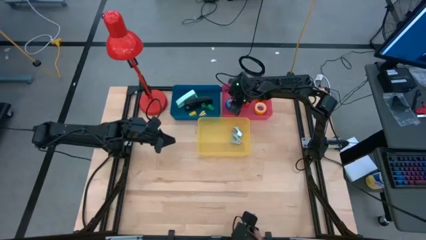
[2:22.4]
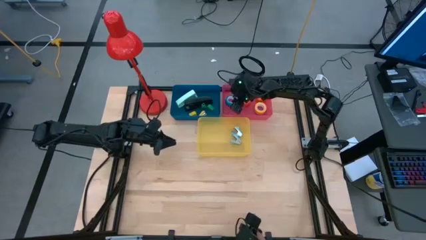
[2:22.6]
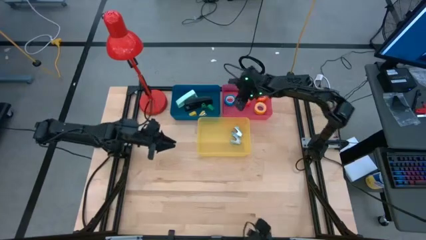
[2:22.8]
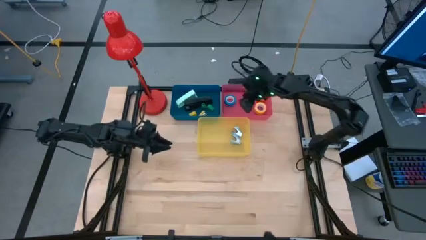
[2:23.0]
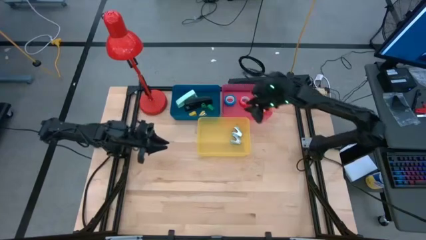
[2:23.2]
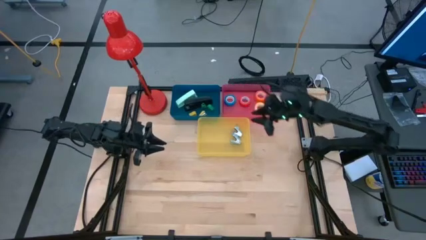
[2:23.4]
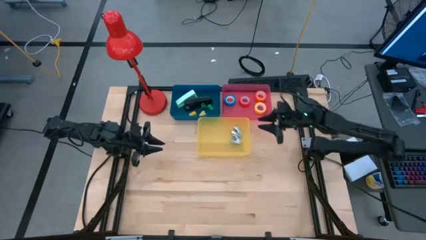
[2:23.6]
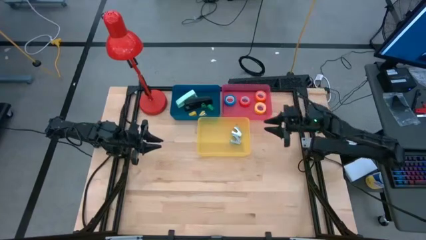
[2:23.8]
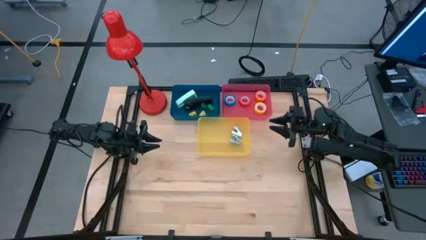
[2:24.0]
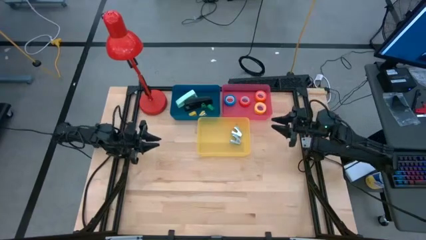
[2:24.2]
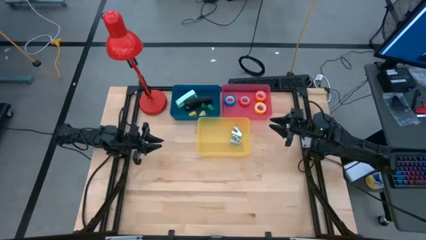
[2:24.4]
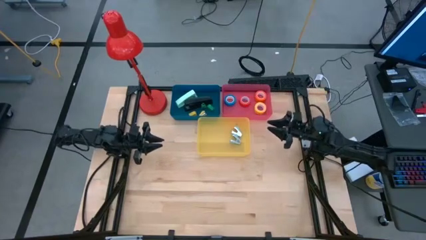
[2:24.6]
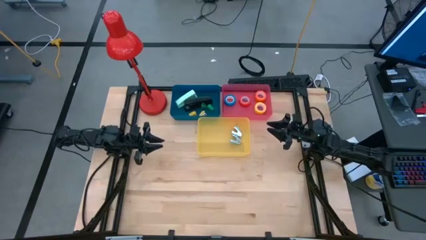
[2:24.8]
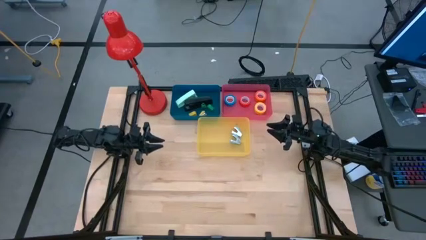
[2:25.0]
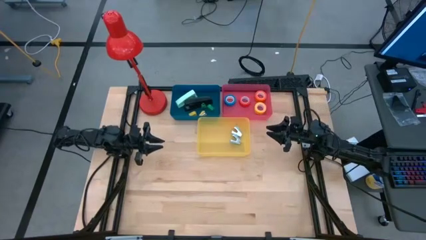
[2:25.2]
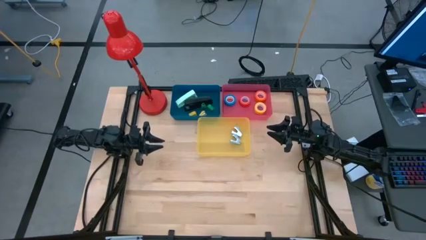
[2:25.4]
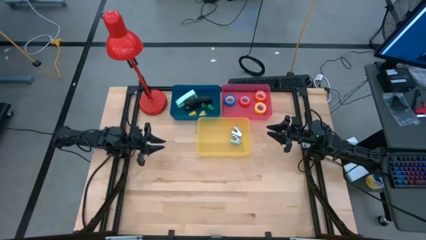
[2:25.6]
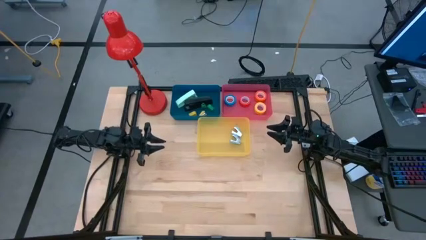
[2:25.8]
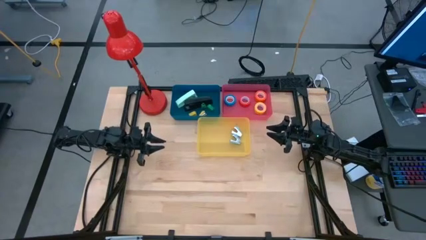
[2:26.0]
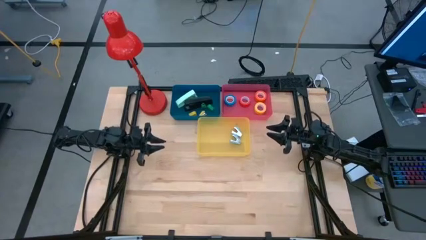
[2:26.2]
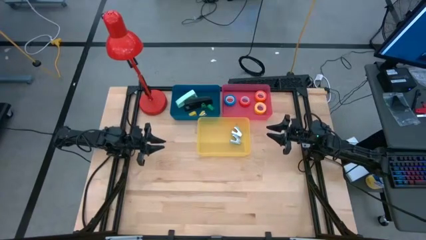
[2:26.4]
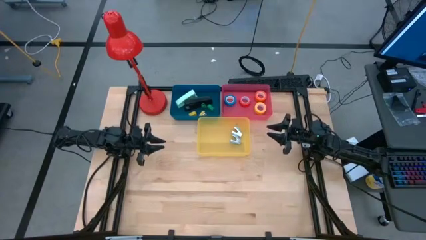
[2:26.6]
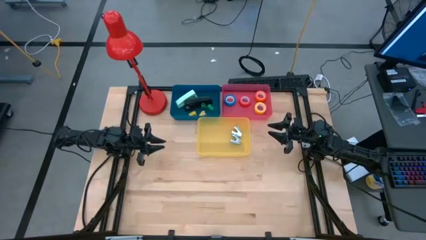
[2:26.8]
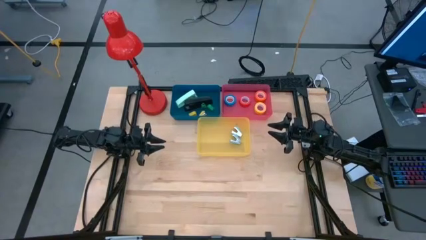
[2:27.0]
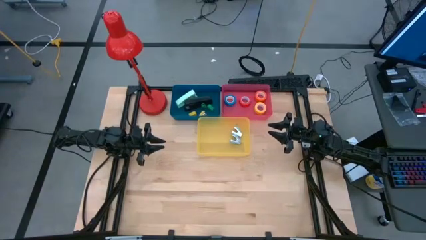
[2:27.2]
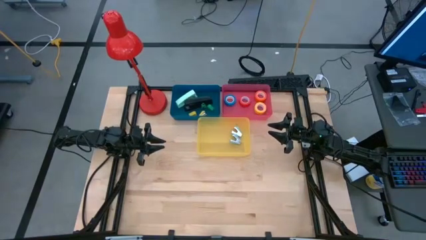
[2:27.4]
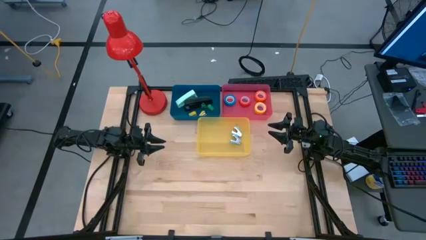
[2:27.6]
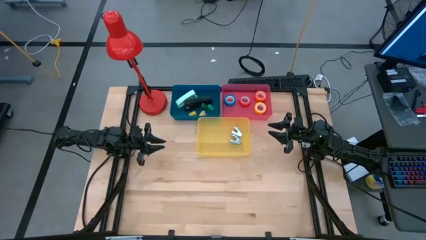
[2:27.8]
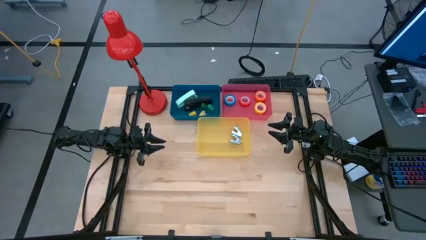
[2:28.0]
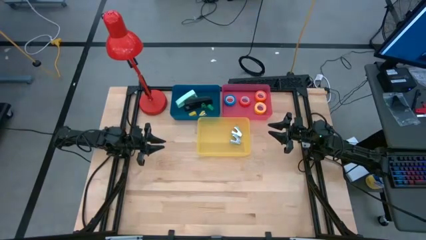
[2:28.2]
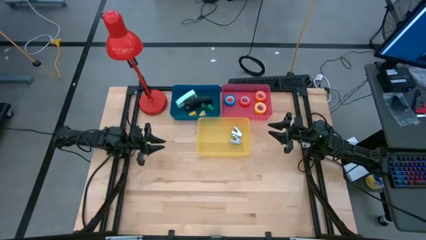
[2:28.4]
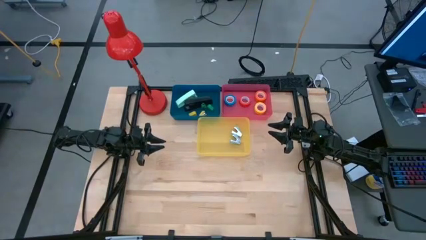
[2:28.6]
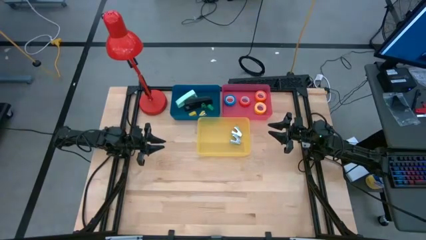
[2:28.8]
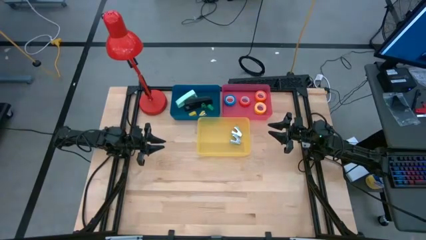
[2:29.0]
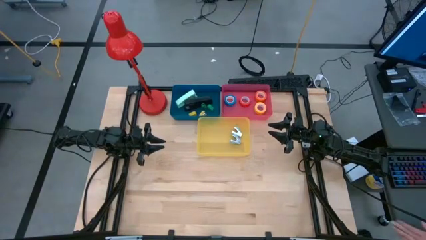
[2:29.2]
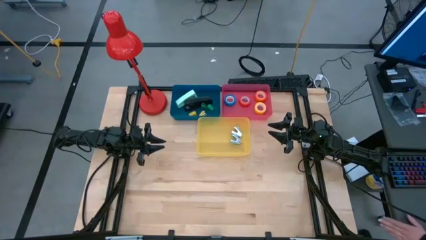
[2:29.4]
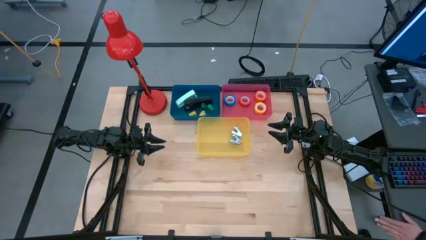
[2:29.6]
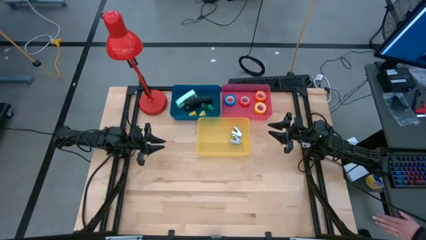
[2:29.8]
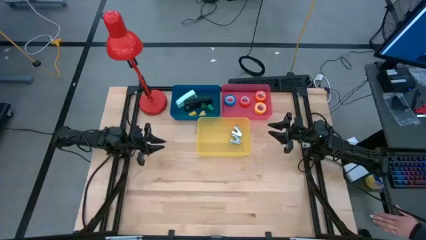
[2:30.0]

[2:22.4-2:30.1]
Task: Pick and place Stapler, Stapler remover, tape
Return to Home Position

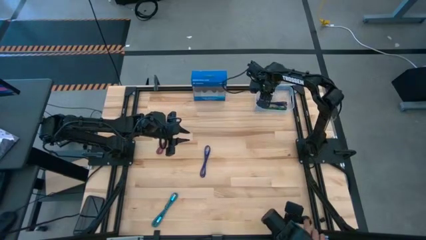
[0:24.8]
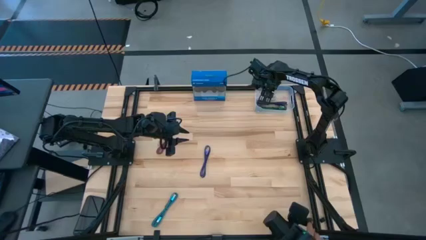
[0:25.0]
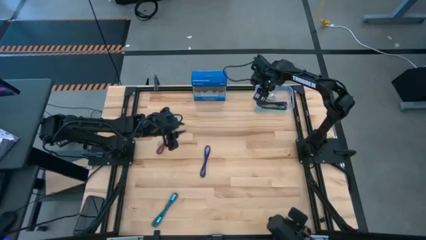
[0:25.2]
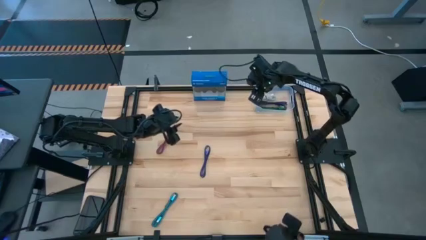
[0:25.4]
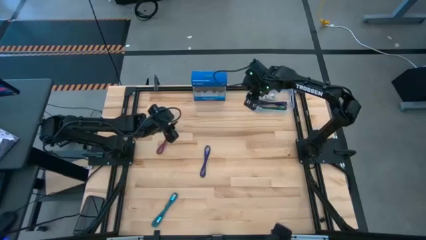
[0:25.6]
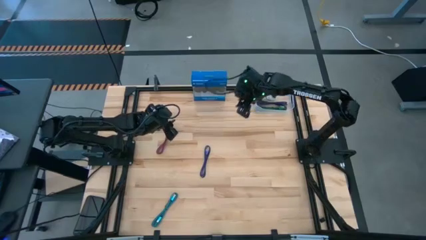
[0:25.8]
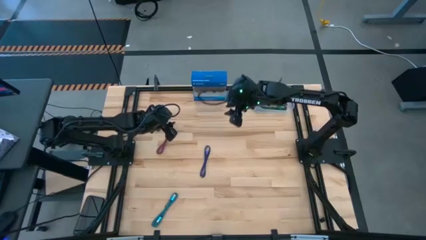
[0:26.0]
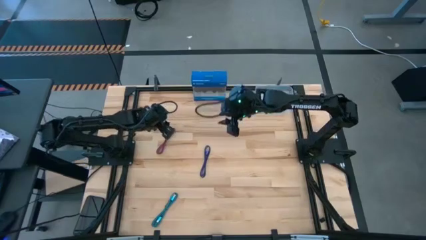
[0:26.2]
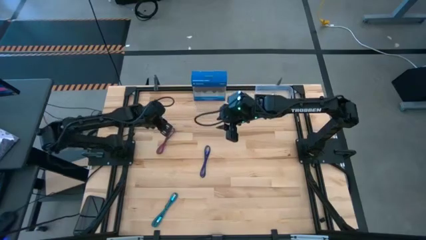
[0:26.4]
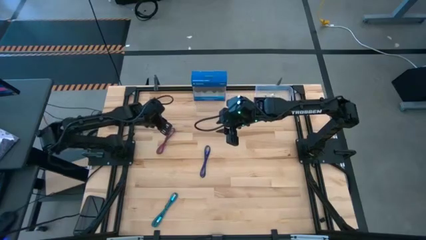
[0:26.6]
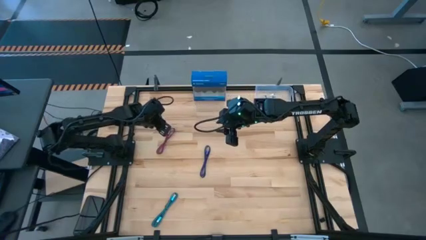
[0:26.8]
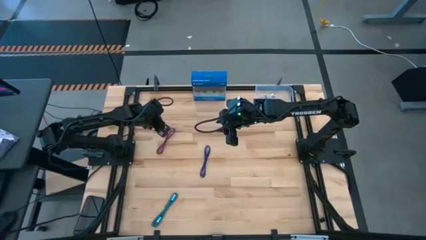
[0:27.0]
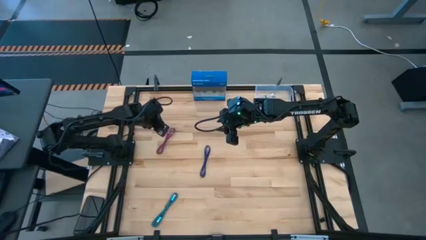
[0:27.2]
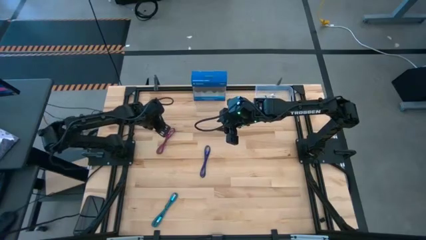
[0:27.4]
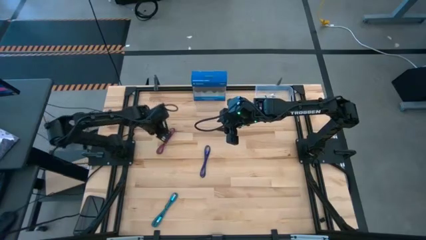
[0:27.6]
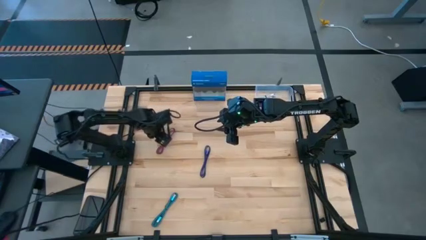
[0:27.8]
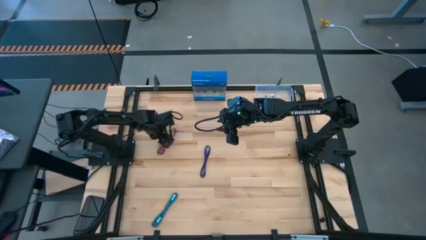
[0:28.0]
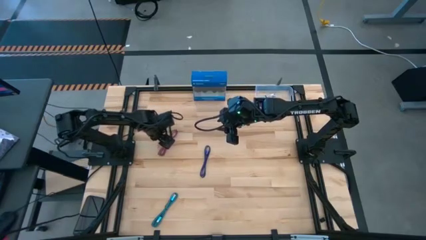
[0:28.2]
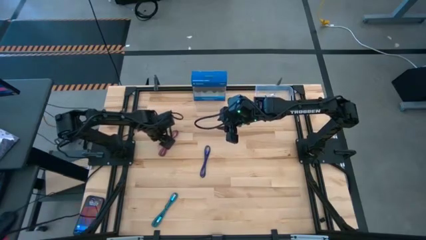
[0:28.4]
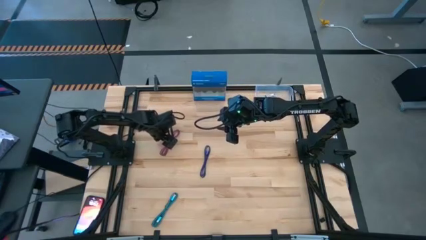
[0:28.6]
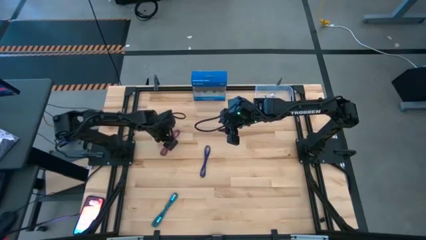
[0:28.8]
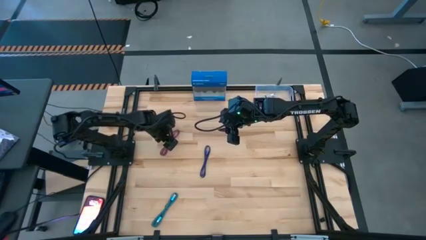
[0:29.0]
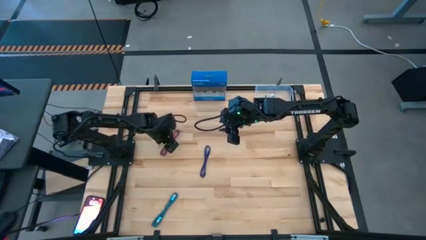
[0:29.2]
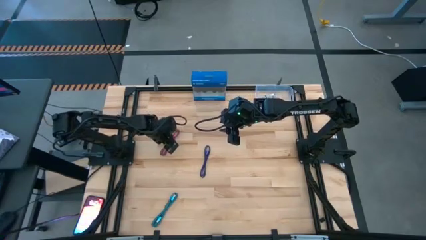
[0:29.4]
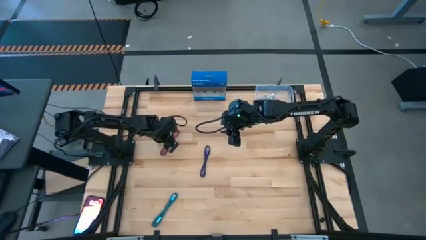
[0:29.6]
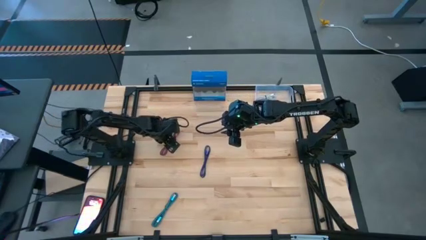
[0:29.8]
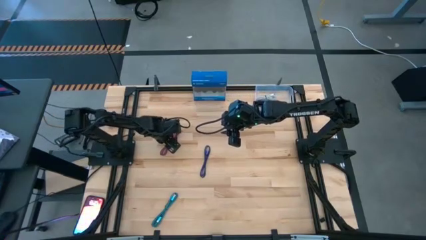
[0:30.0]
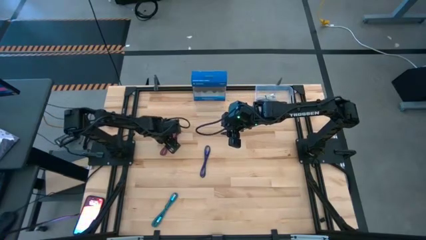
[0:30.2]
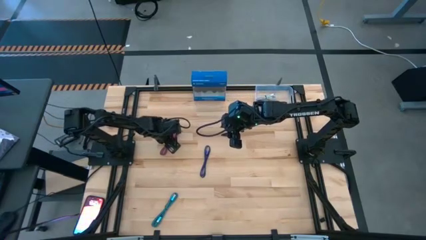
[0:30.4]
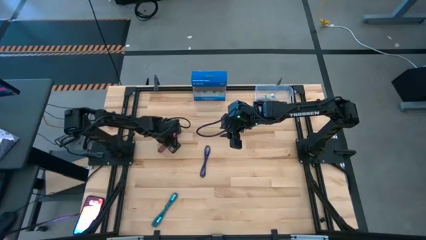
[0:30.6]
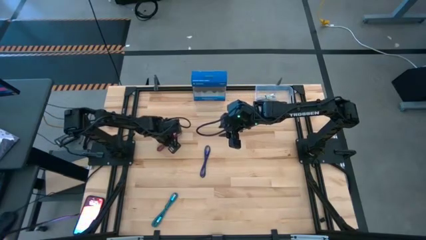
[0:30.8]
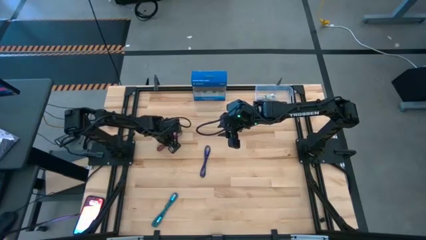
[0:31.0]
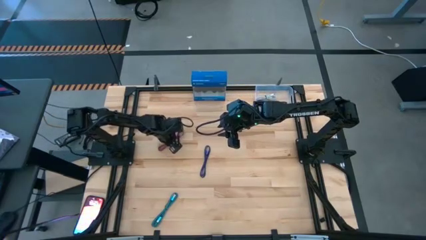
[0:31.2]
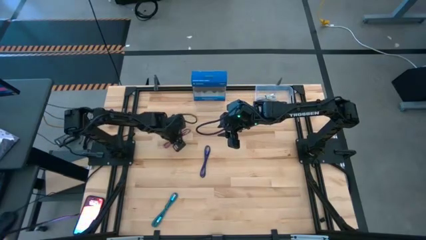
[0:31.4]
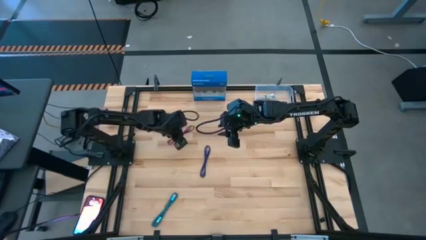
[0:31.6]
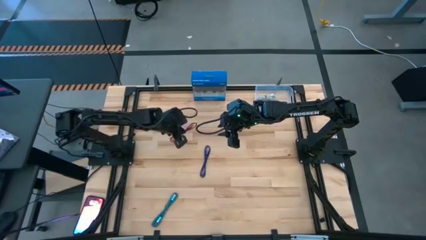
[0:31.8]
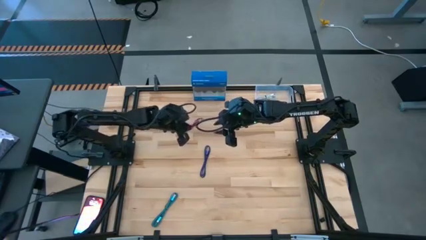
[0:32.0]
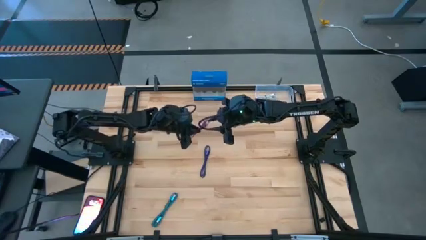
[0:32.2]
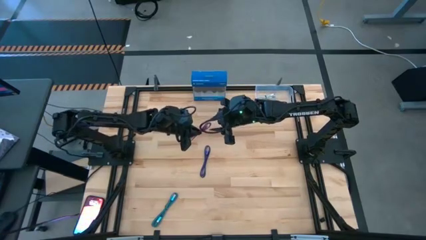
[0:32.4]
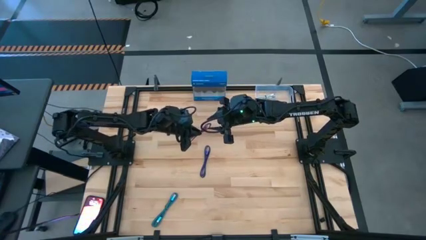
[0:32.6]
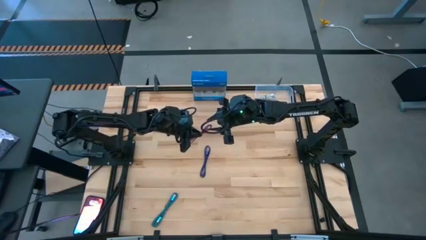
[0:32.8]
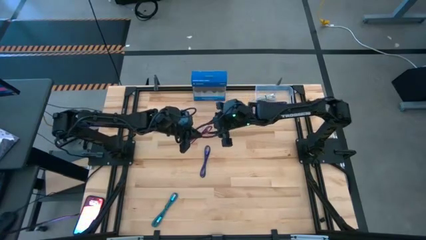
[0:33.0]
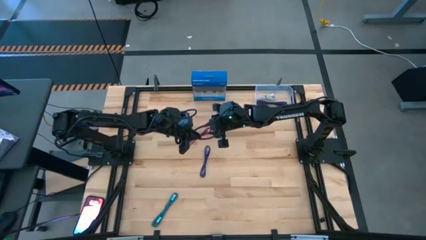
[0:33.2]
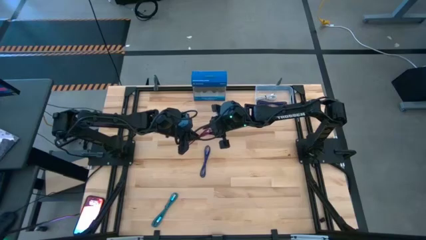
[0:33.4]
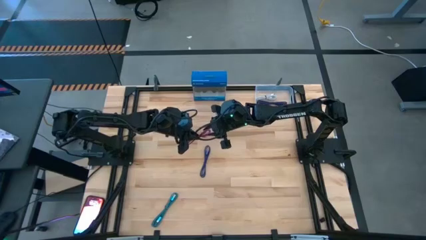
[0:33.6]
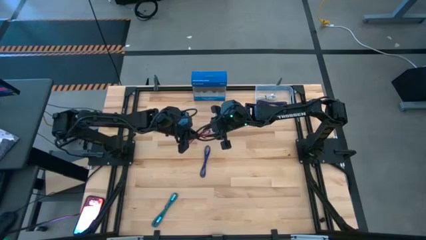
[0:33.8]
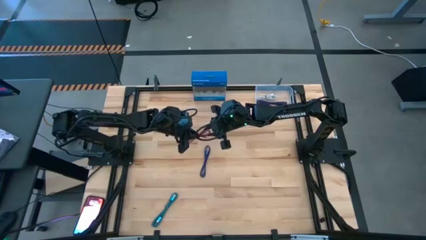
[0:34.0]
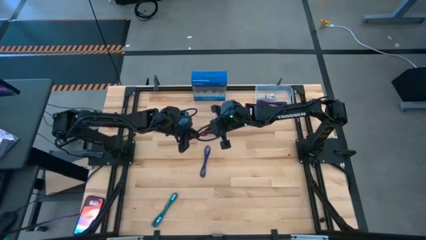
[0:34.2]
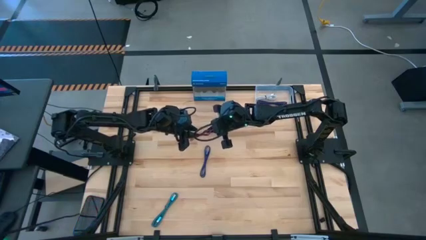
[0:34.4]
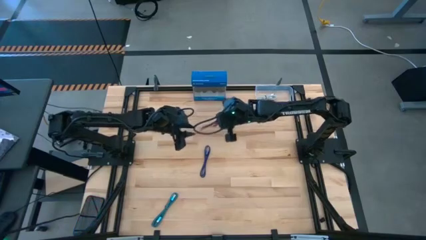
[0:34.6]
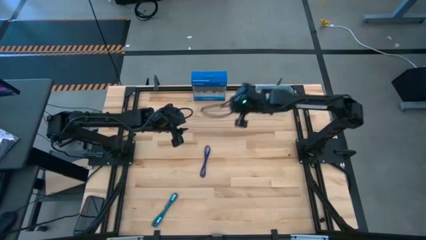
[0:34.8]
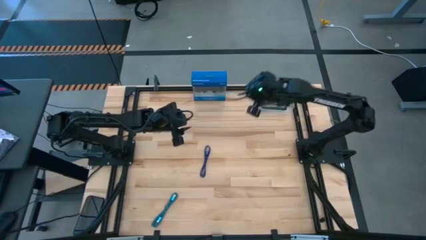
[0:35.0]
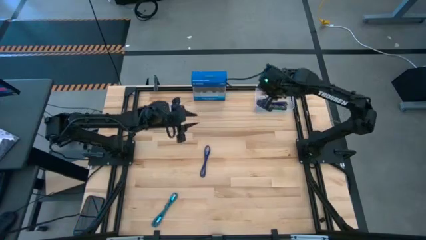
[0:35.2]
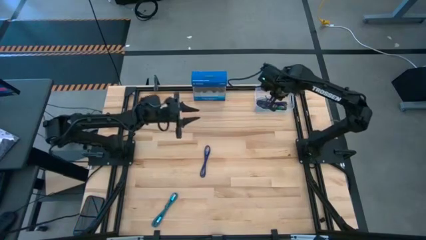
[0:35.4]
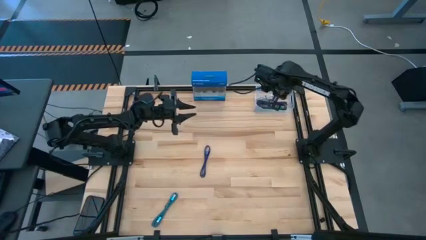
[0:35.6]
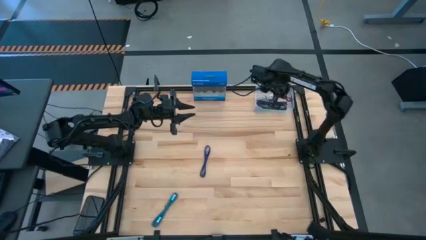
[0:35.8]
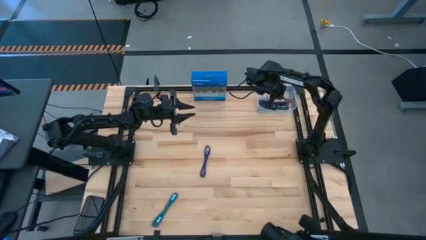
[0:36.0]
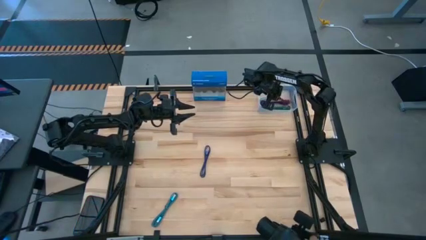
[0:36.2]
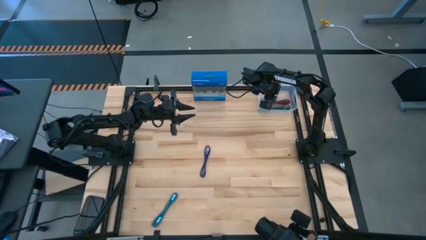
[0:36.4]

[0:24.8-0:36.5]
Task: Pick and place USB-C Cables
Put the pink charger cable into the bin
